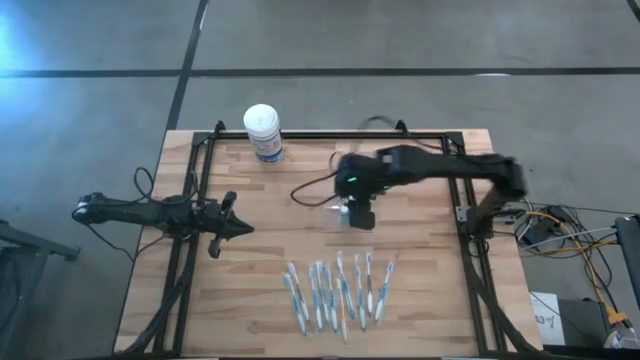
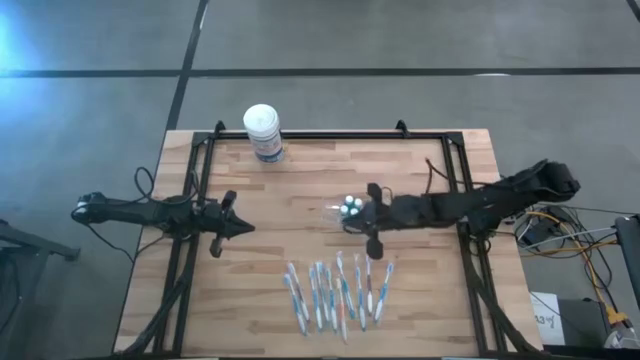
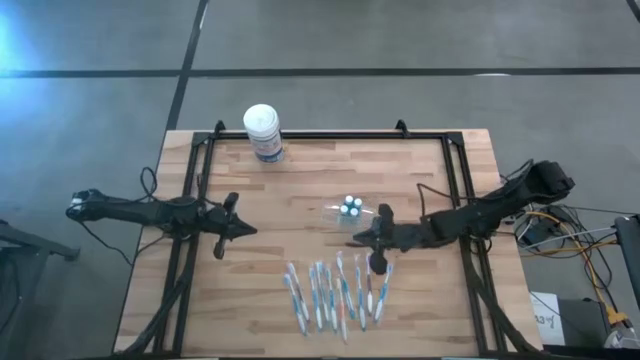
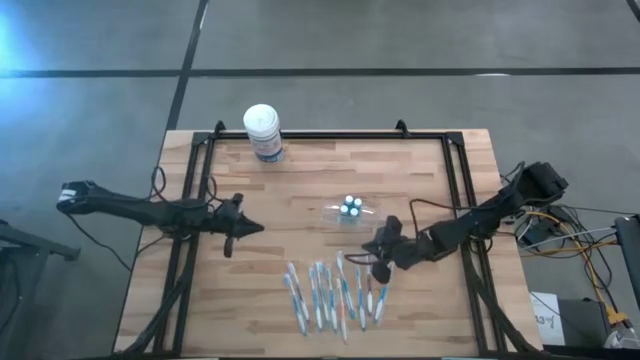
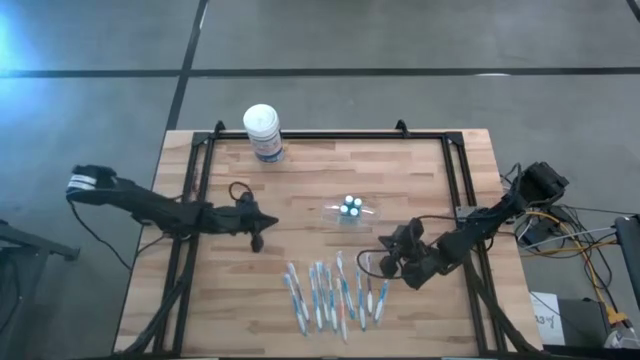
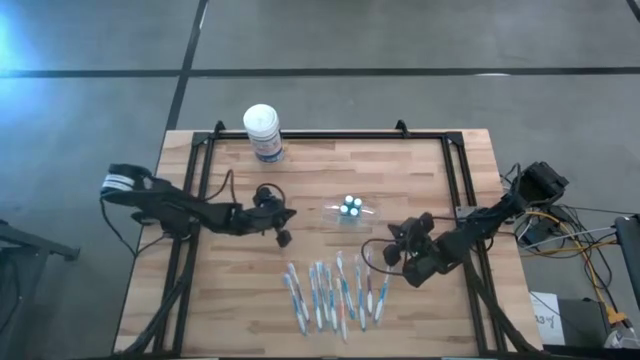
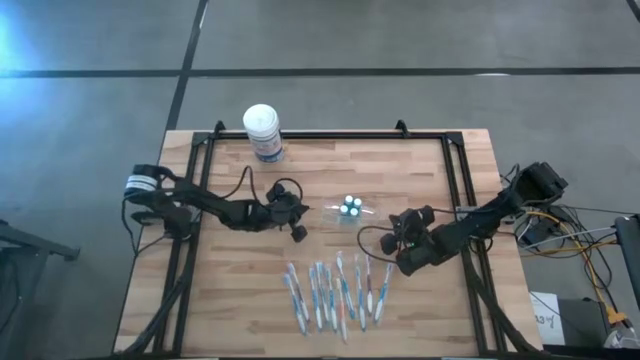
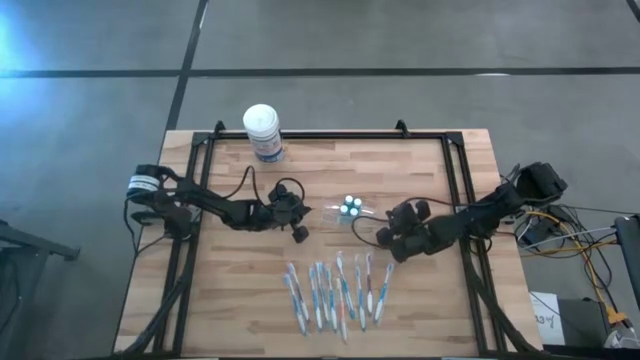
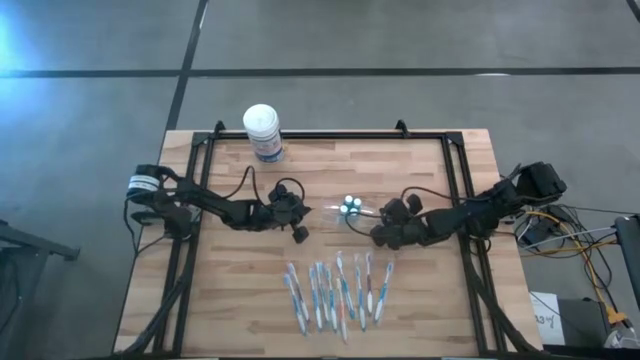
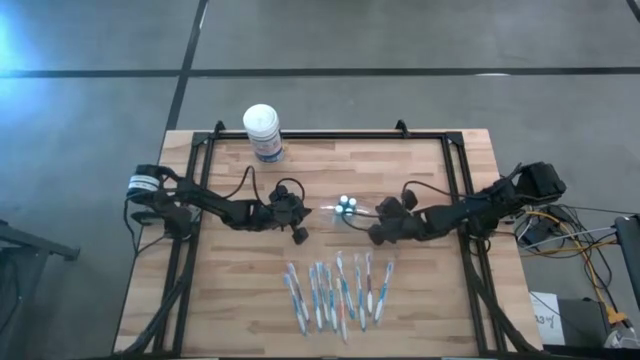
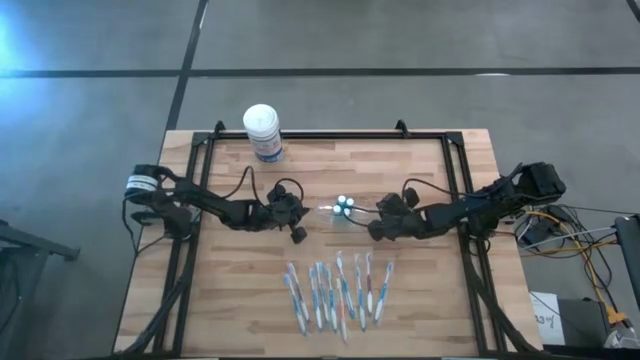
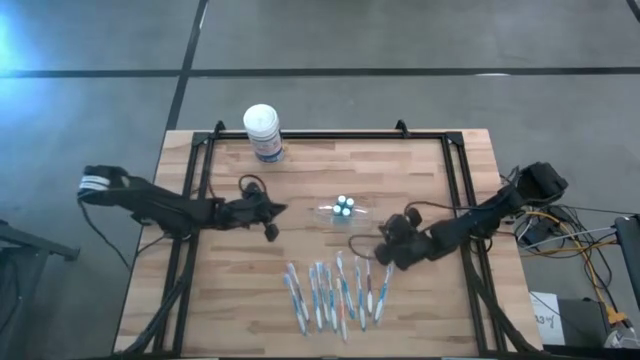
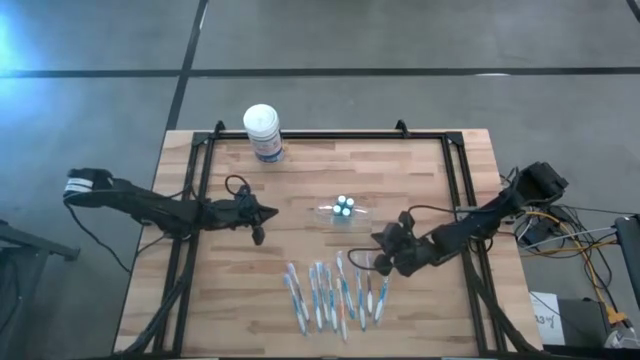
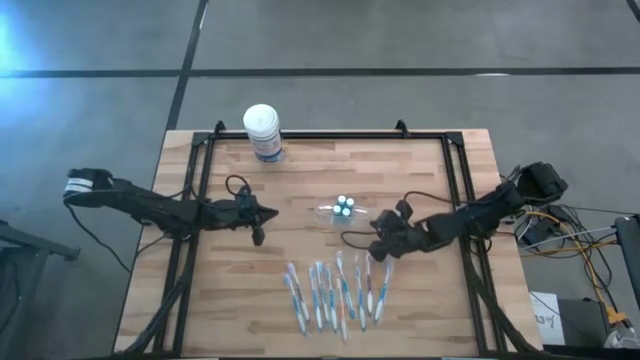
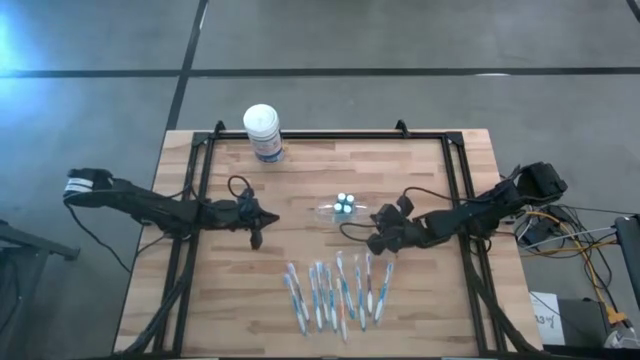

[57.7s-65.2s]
Task: Pick & Place toothbrushing station
Adjust the transparent organizer

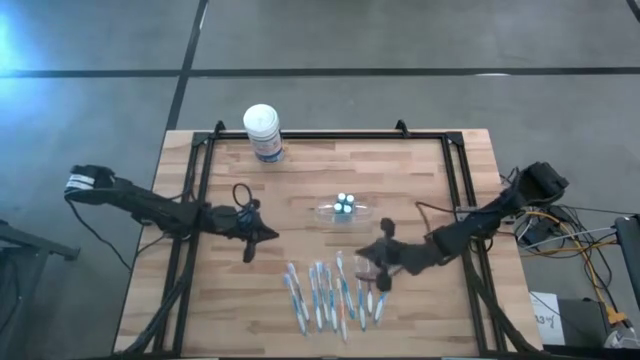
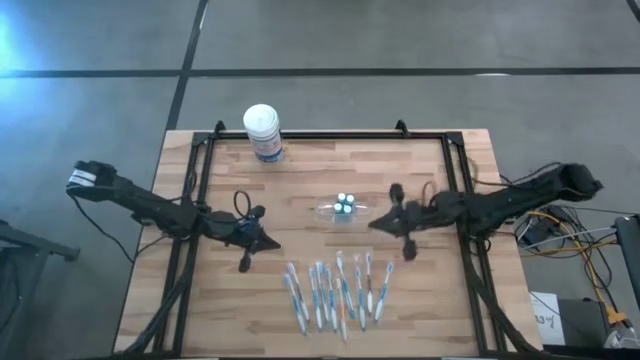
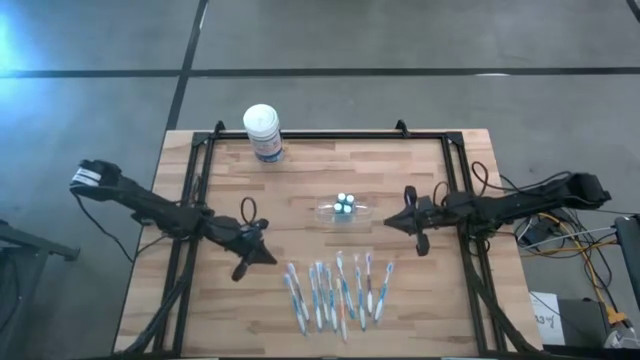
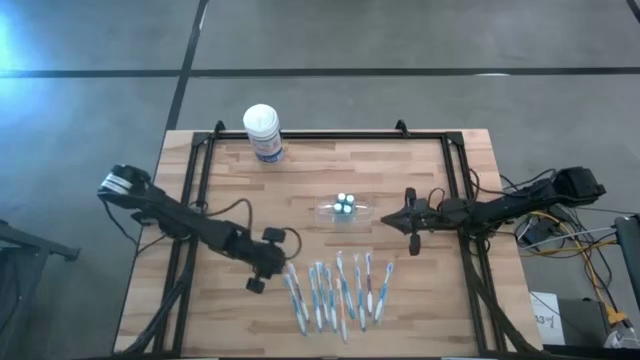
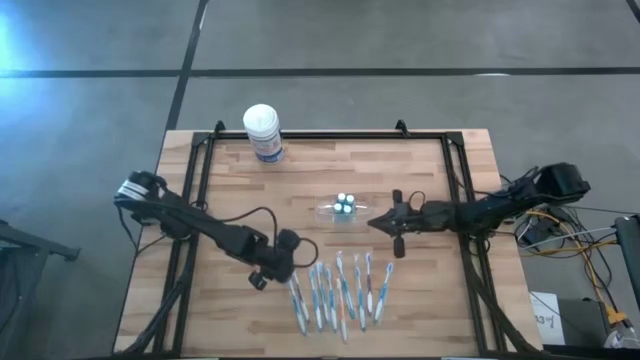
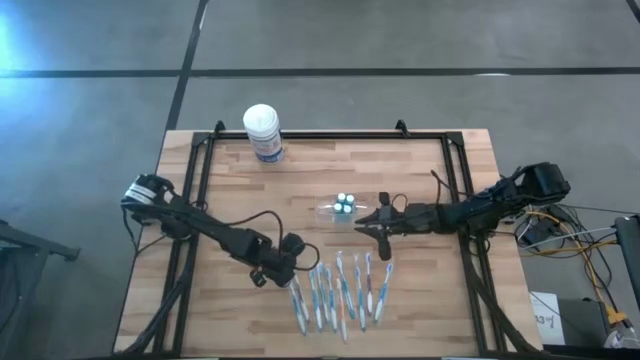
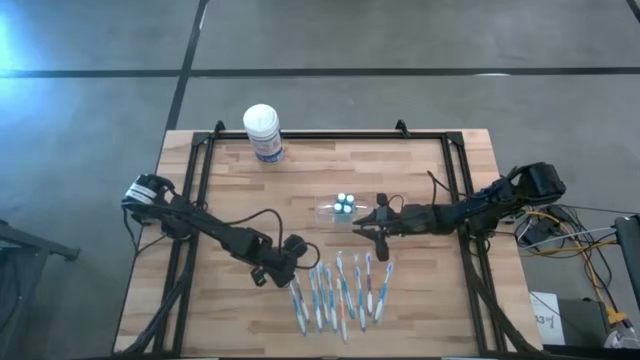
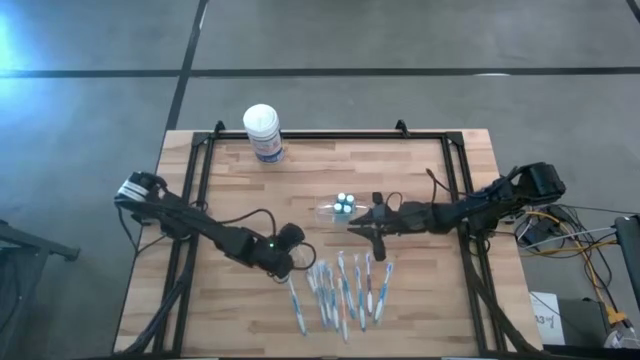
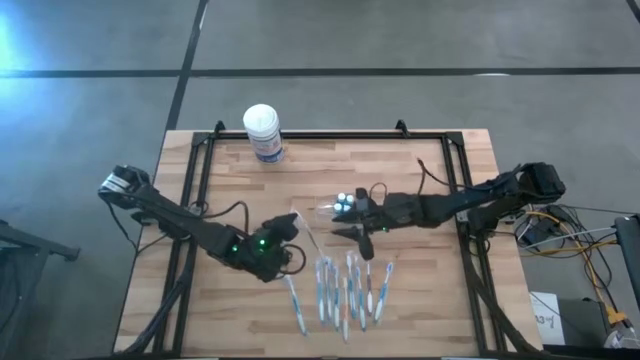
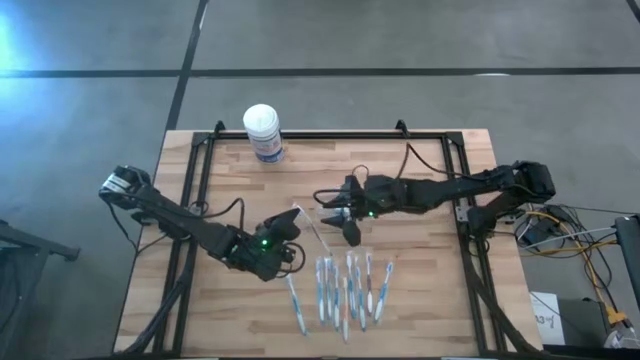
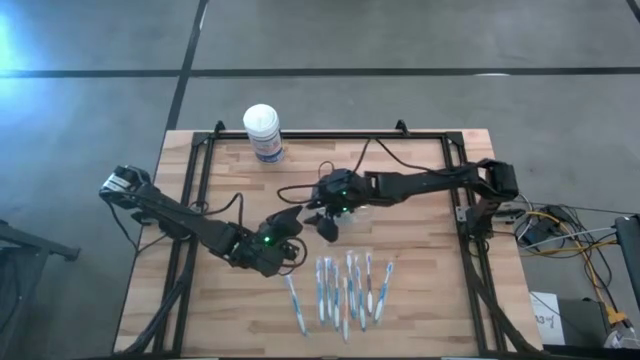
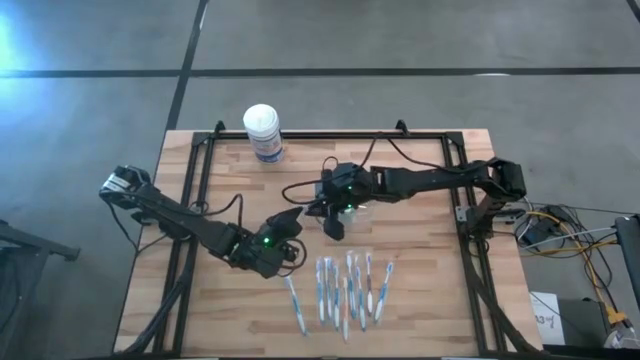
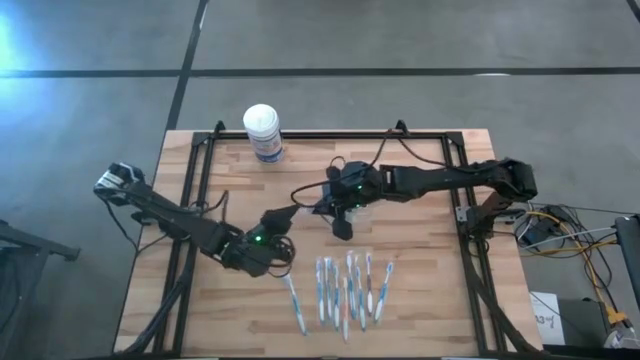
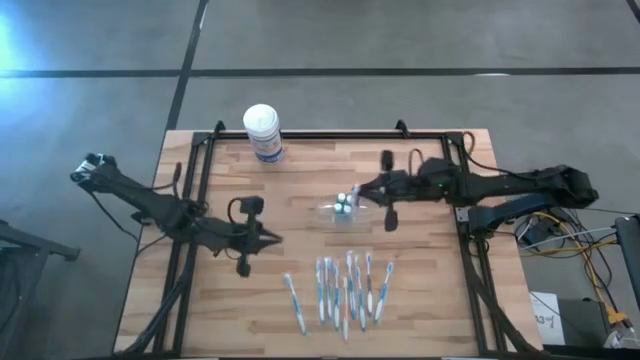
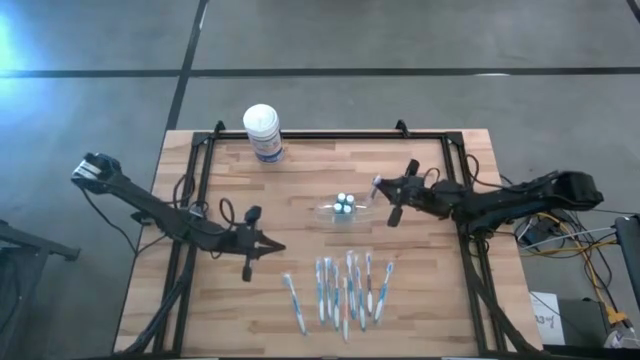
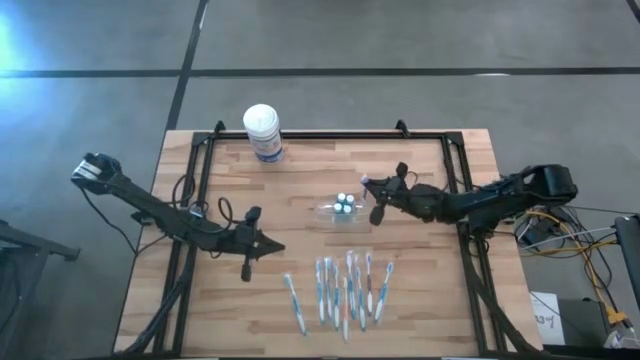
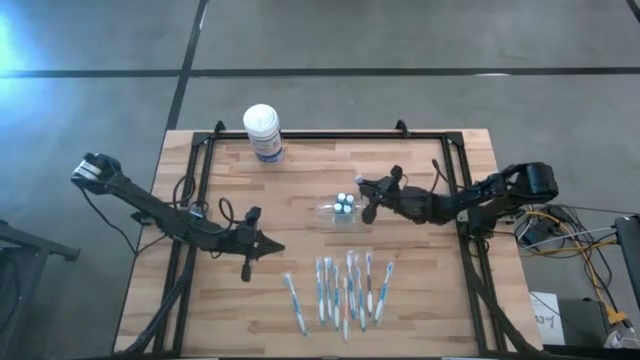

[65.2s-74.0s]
Put the purple toothbrush into the transparent organizer

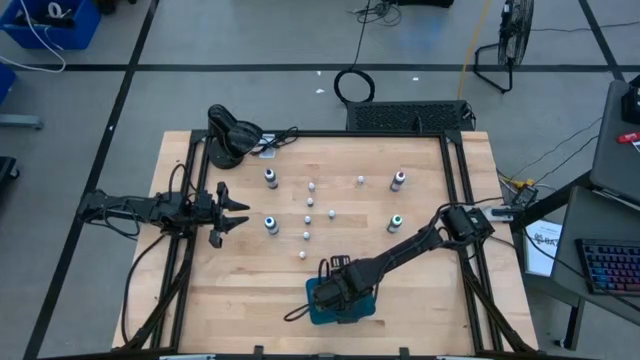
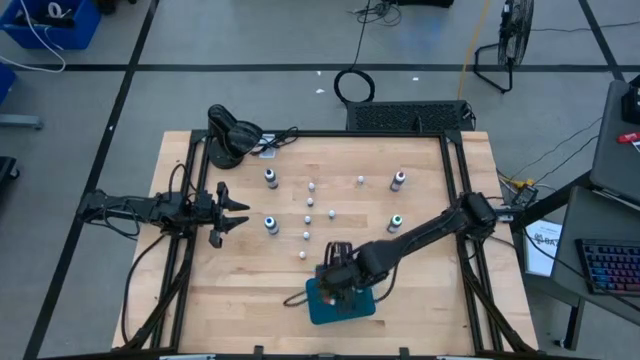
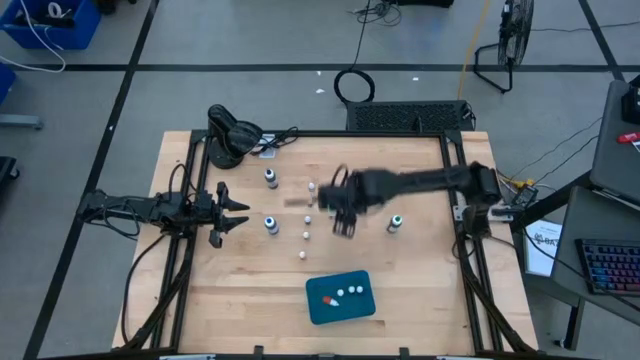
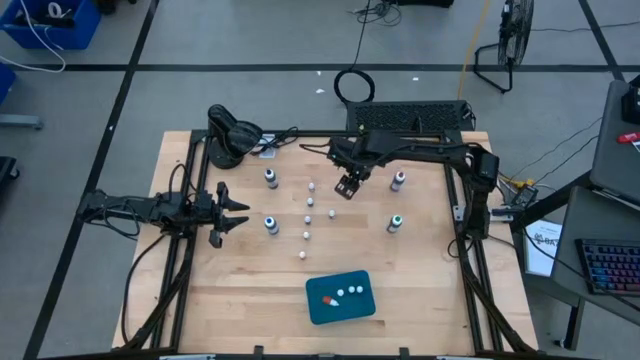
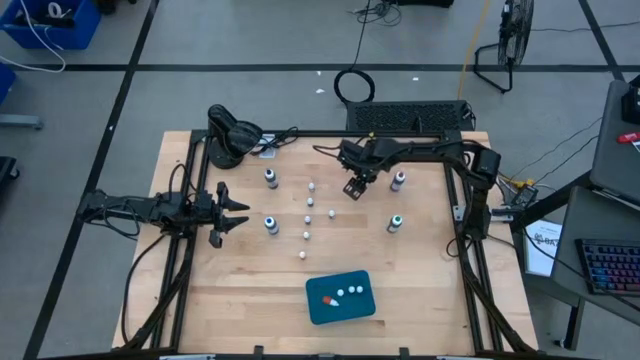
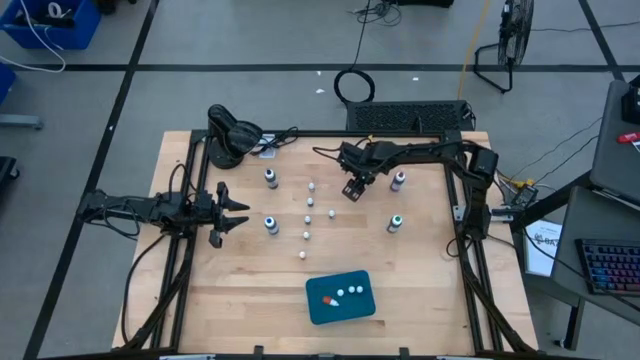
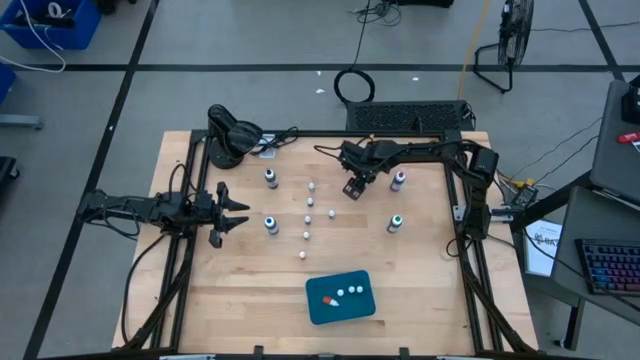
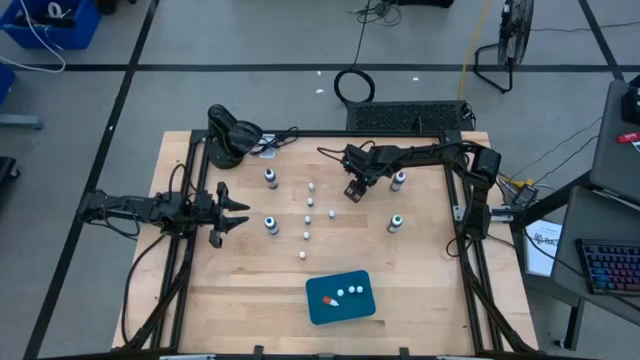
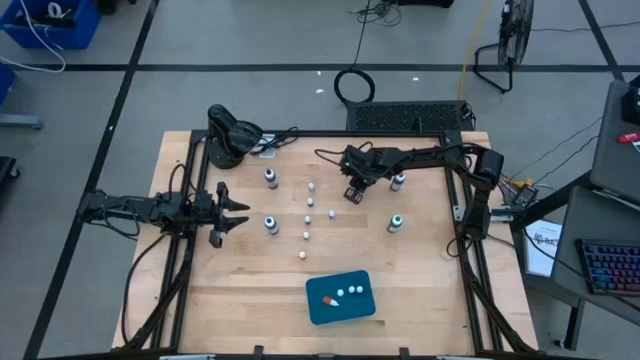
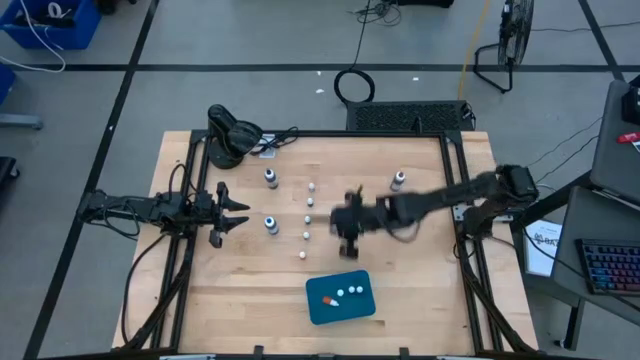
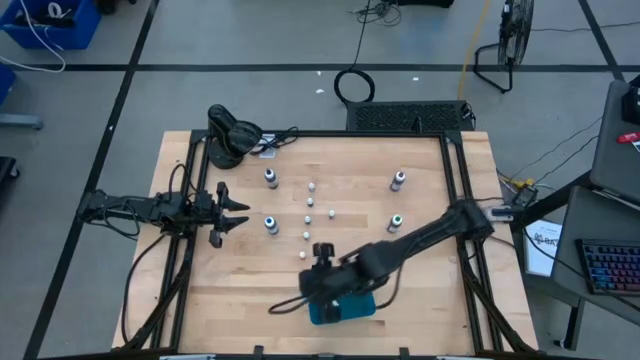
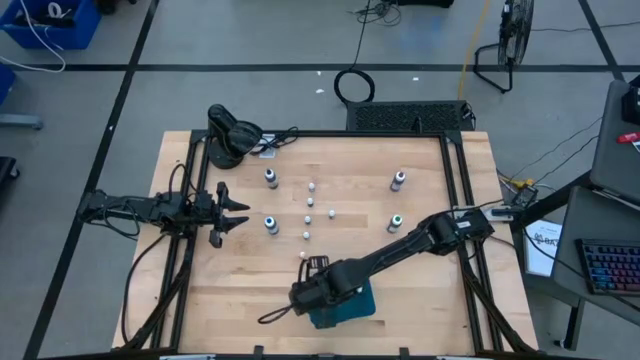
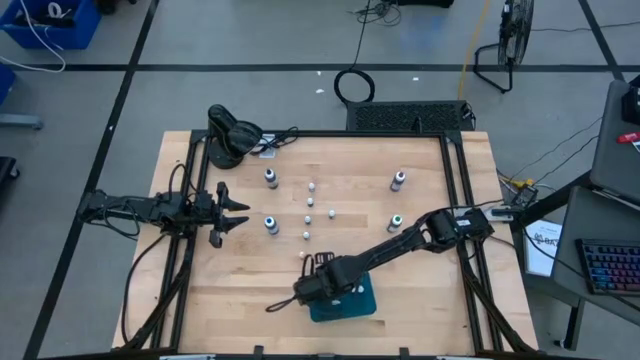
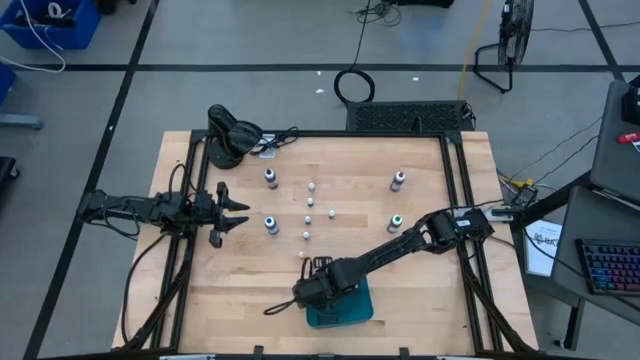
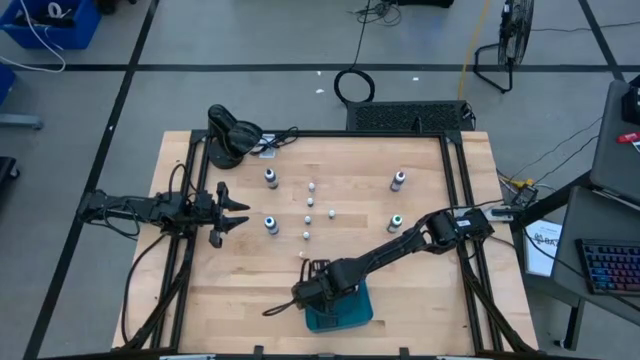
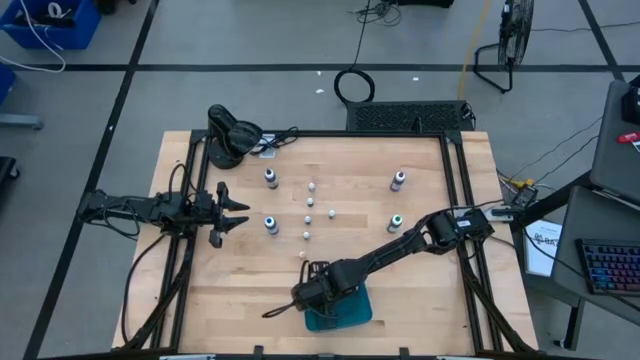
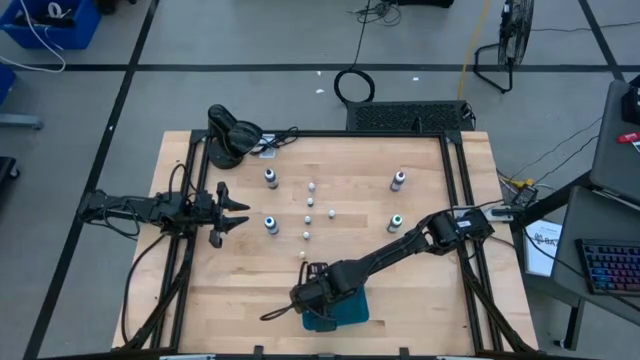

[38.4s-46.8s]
Task: Pick & Place food coloring
Put the small orange coloring bottle into the blue bin
